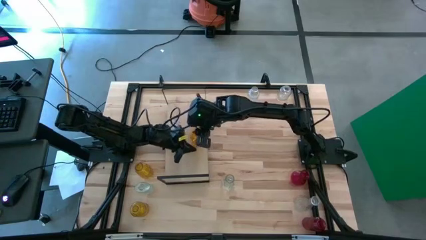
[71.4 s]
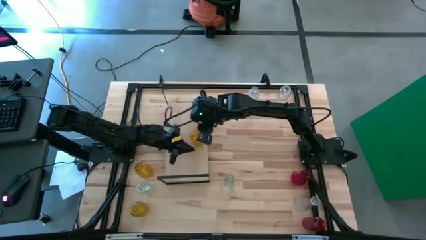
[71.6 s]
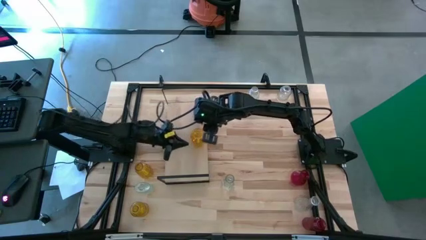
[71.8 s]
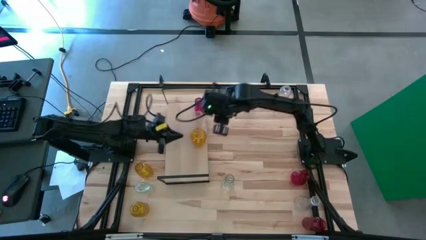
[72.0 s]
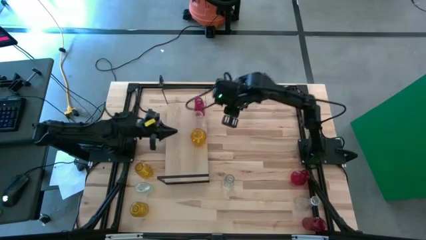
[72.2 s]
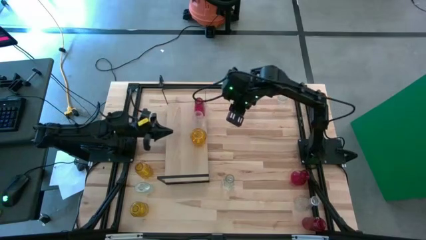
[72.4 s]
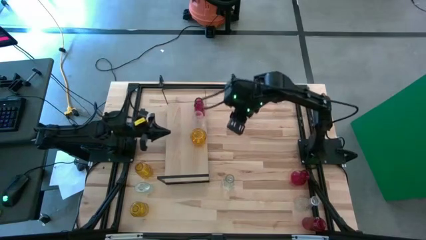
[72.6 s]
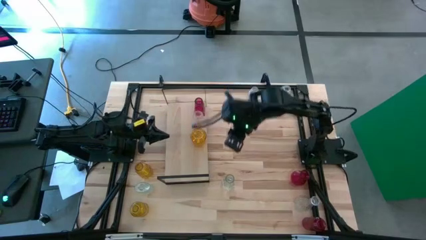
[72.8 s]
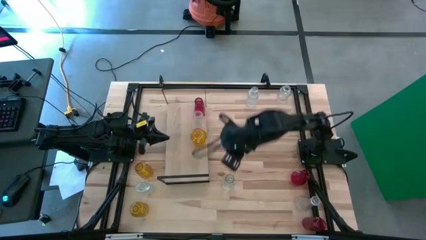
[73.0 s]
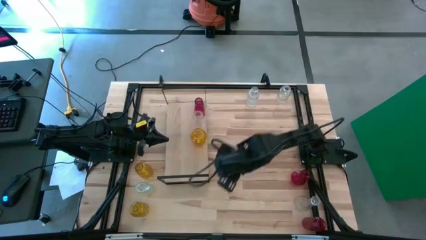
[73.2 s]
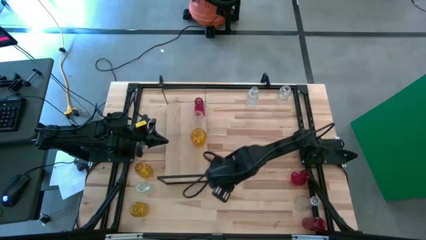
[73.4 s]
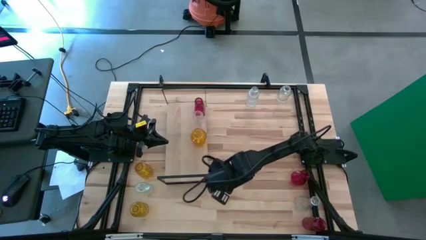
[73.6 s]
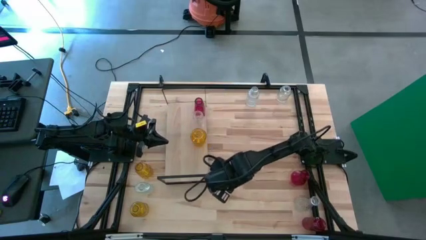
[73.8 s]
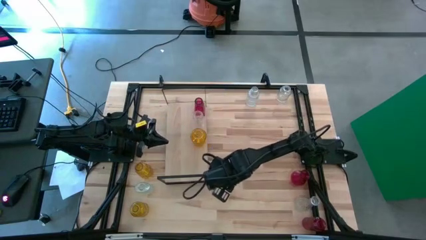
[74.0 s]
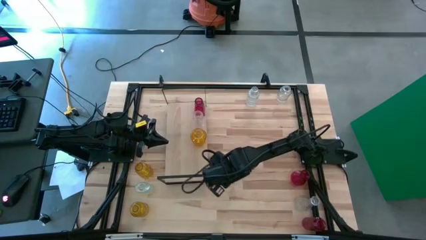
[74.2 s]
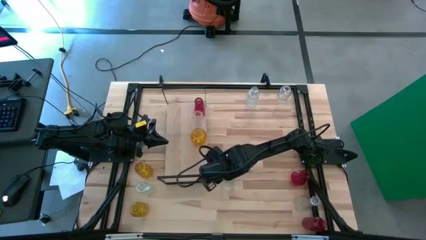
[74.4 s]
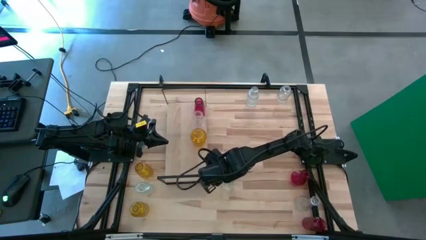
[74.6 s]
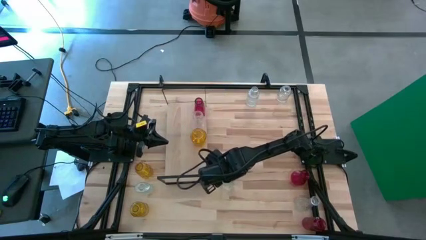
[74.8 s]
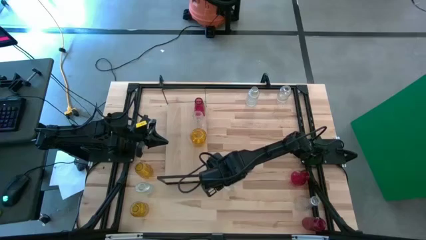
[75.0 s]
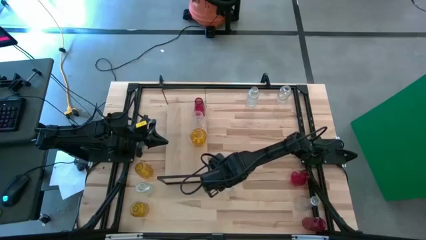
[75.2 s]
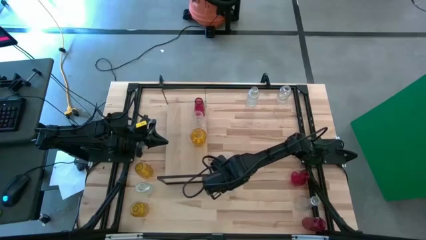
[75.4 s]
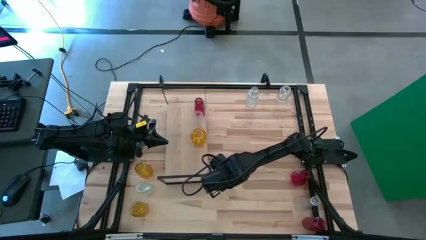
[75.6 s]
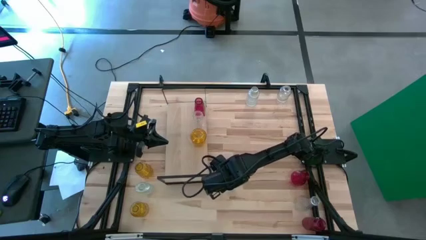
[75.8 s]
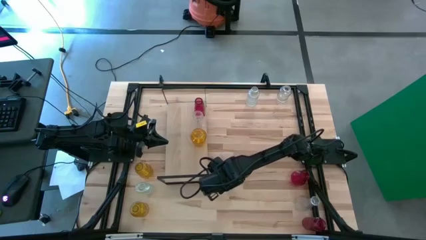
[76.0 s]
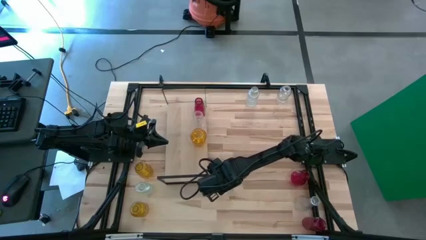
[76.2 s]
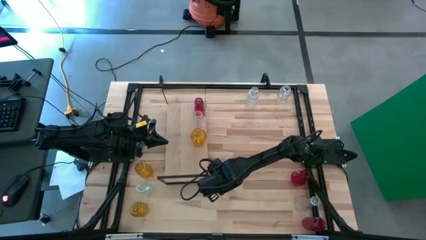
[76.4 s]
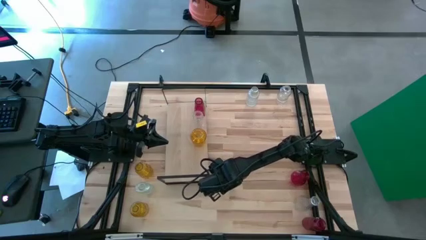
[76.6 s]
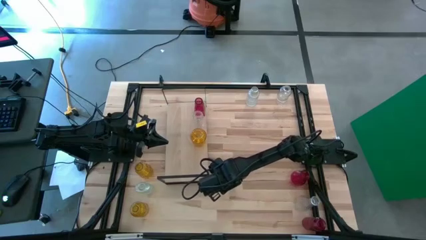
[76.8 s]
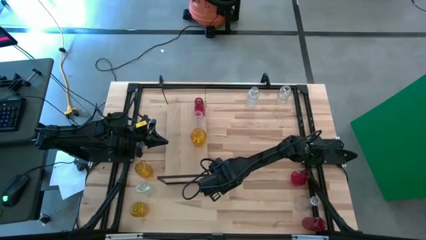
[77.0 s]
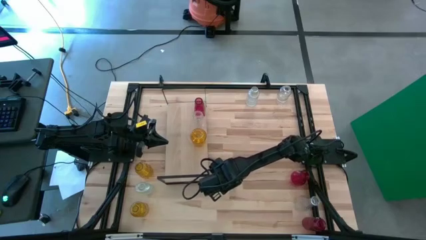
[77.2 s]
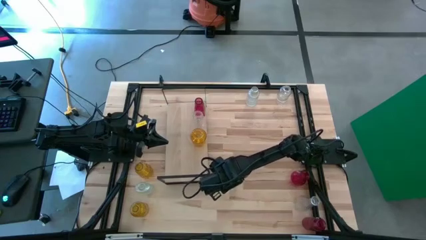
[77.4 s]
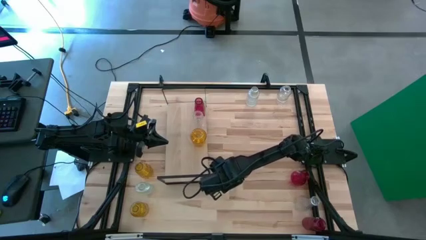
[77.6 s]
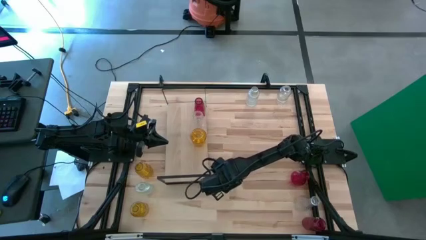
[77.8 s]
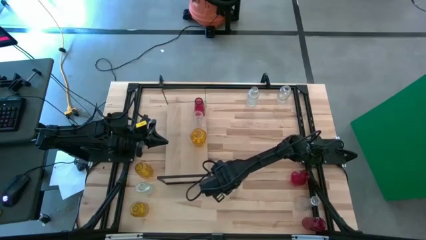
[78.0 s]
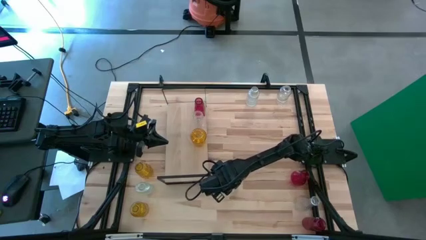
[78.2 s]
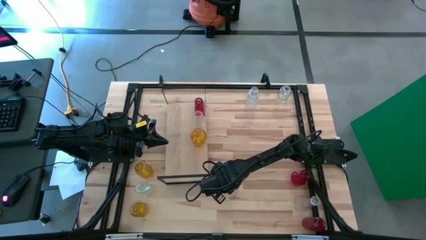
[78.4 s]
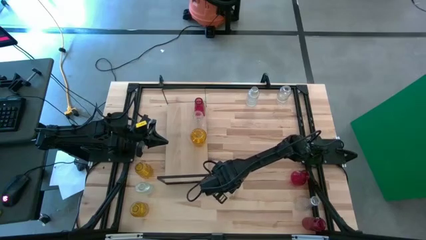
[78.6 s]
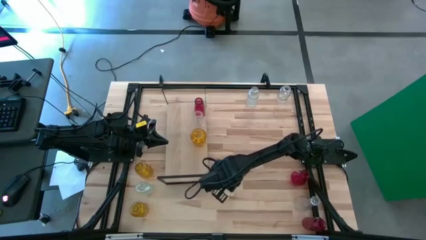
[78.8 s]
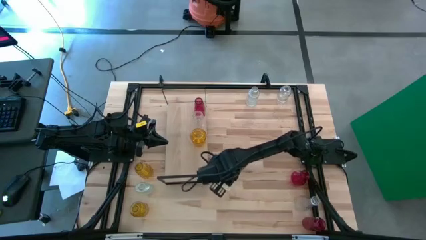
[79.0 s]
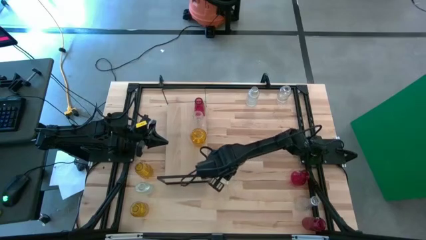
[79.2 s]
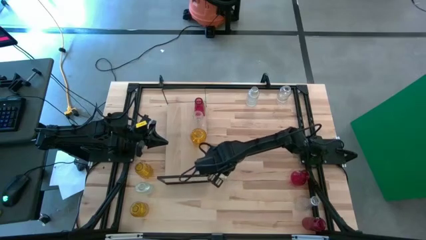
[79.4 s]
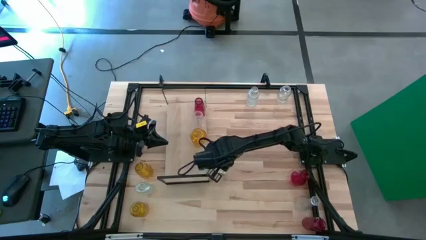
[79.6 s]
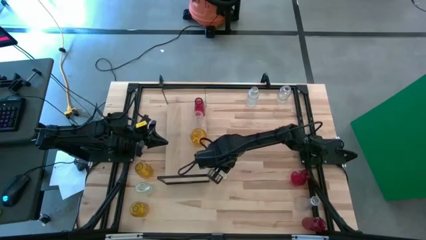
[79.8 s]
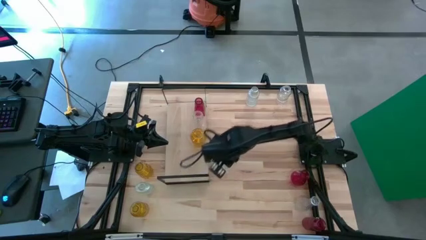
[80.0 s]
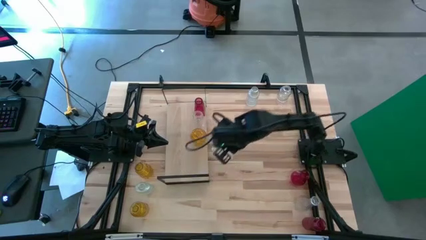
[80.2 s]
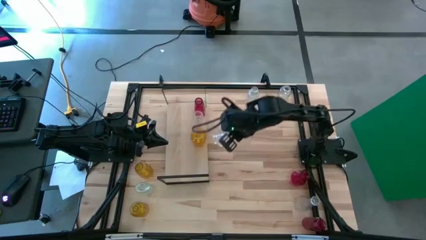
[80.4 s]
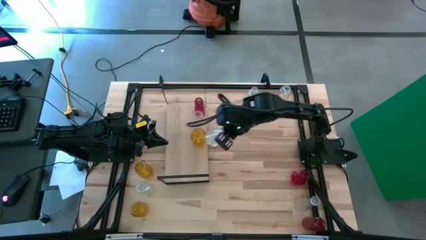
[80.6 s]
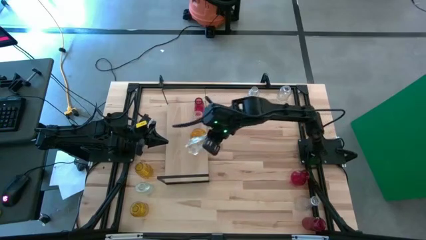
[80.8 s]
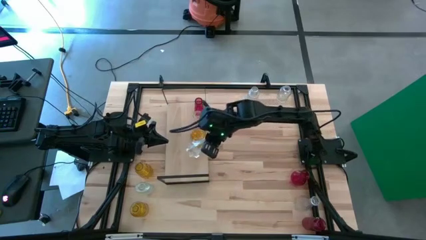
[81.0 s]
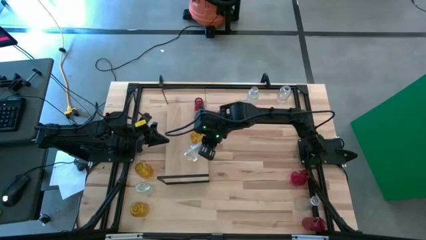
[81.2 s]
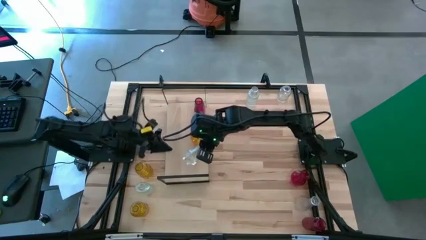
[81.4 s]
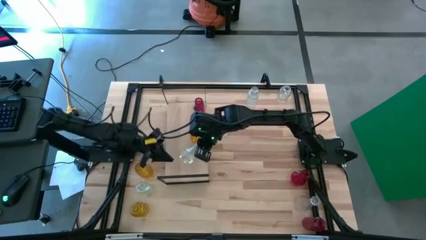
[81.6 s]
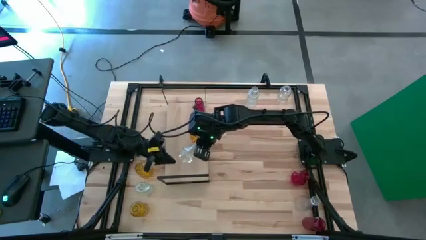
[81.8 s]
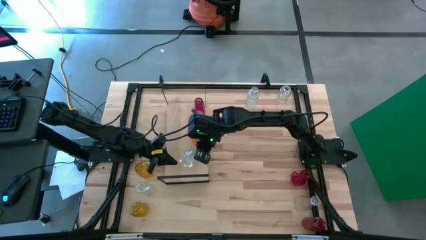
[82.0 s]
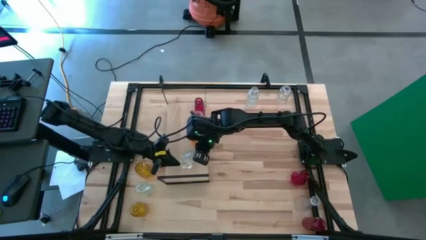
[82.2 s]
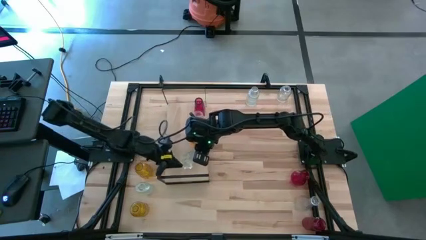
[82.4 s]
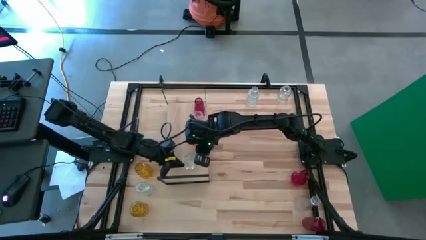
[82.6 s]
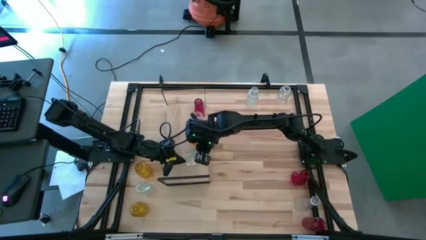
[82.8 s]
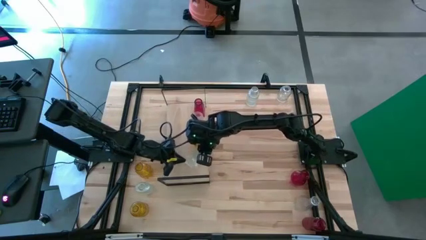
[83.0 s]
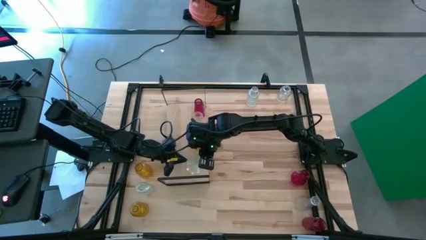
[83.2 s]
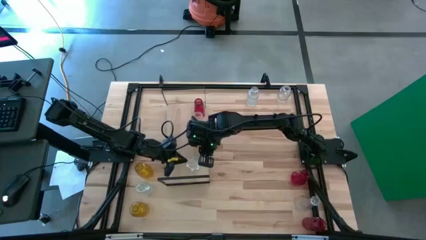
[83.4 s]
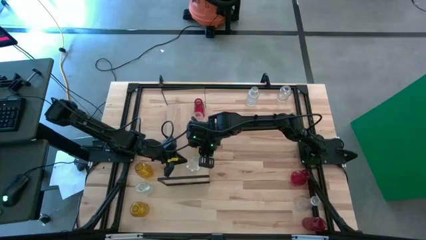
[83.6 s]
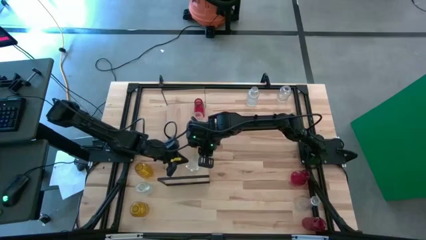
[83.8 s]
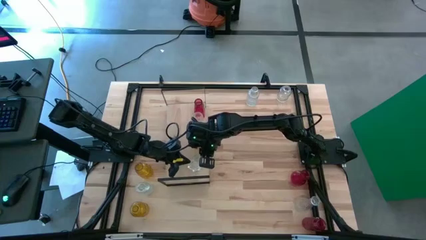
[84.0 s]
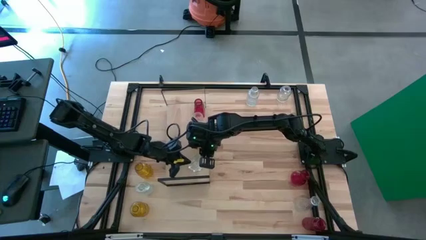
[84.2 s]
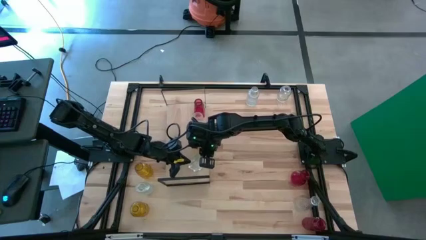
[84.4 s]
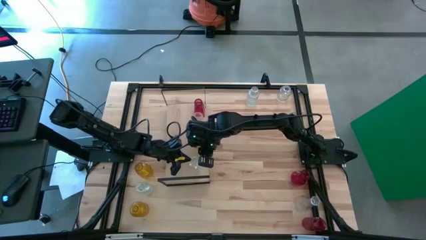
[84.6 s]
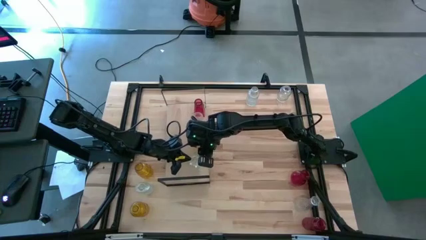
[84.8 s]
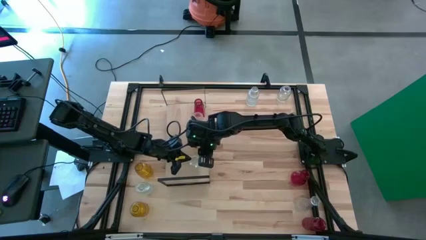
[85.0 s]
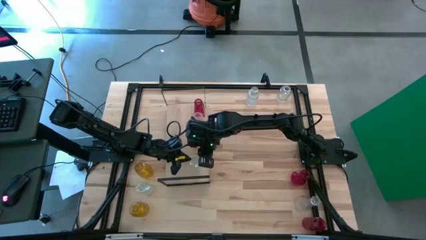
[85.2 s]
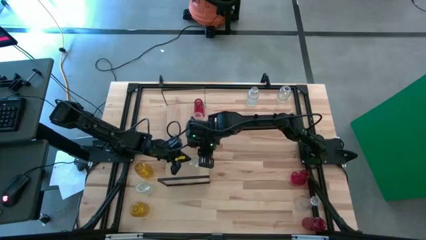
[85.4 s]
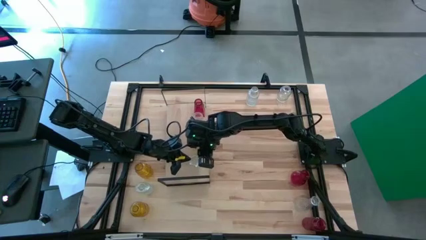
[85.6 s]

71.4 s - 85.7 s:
Task: sort vases onto shelf
Put the transparent vase on the shelf aligned with the other transparent vase
